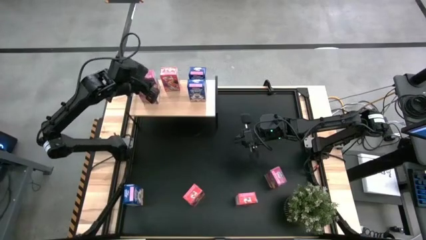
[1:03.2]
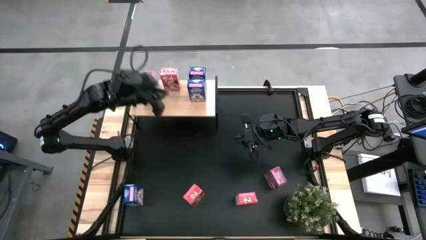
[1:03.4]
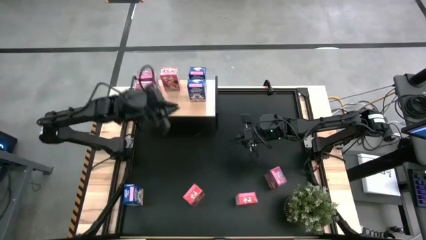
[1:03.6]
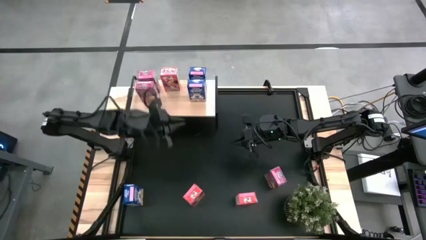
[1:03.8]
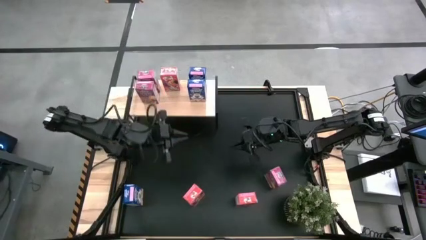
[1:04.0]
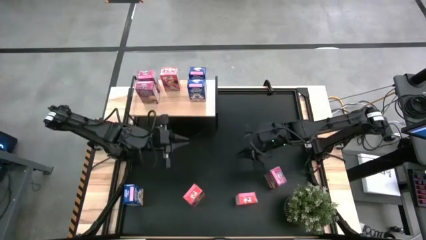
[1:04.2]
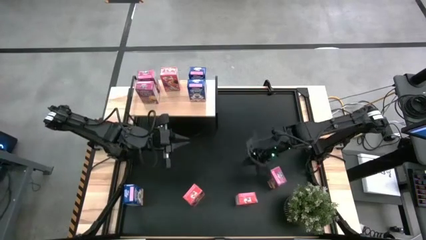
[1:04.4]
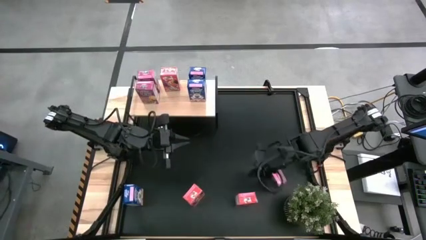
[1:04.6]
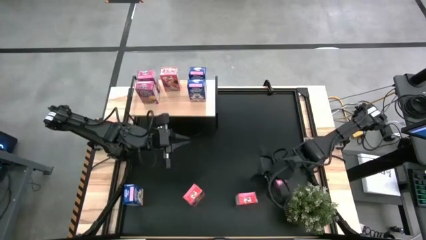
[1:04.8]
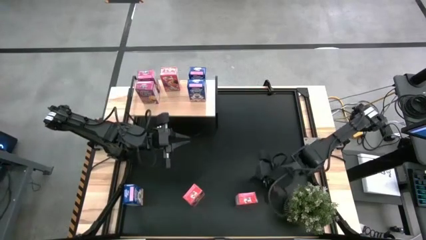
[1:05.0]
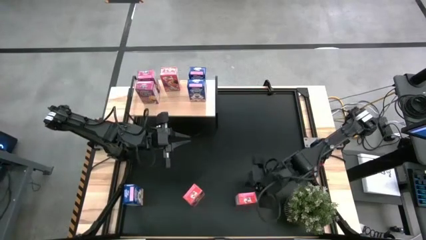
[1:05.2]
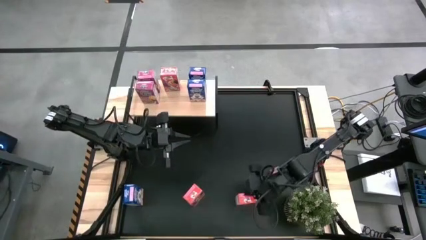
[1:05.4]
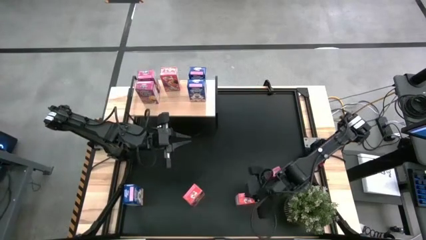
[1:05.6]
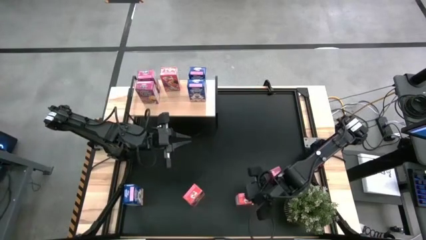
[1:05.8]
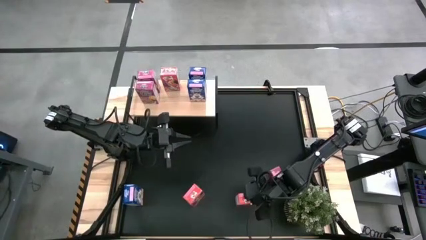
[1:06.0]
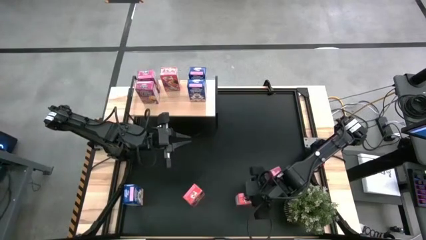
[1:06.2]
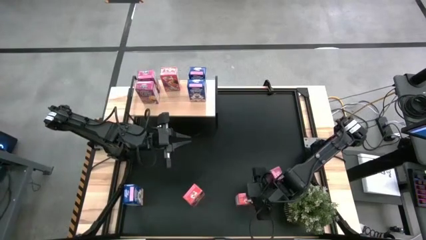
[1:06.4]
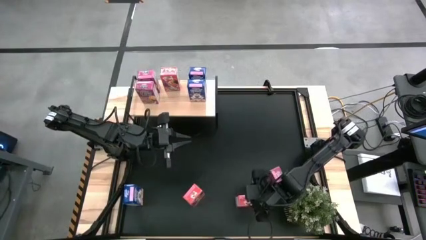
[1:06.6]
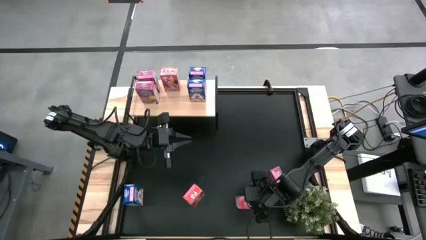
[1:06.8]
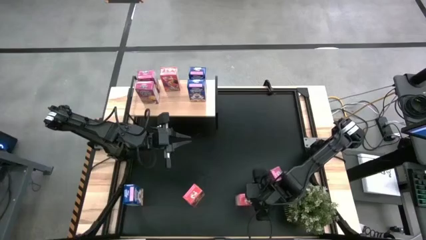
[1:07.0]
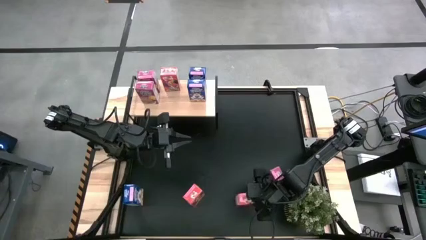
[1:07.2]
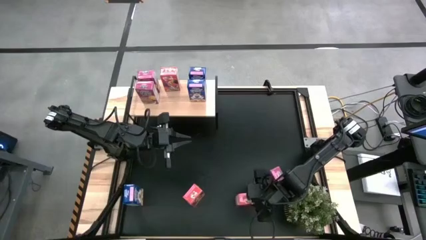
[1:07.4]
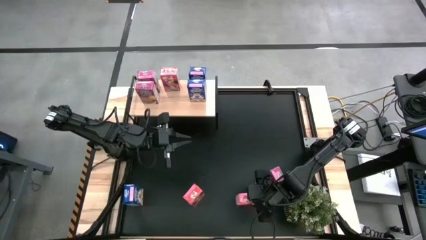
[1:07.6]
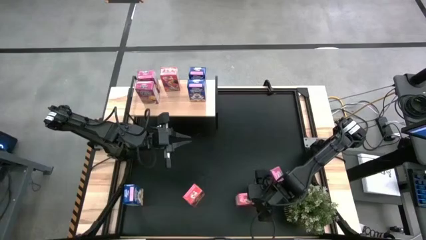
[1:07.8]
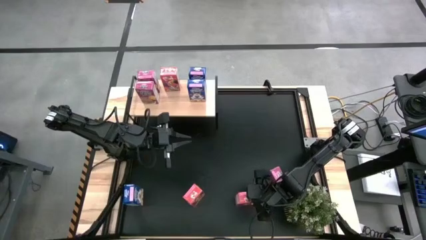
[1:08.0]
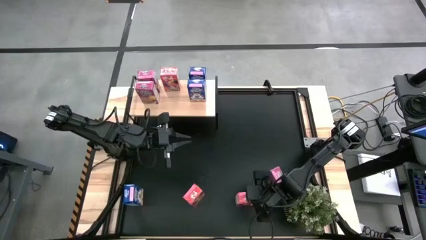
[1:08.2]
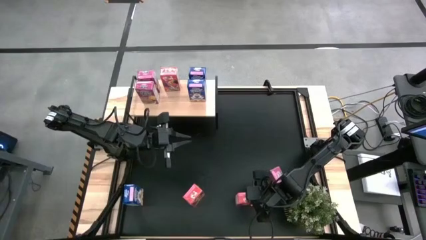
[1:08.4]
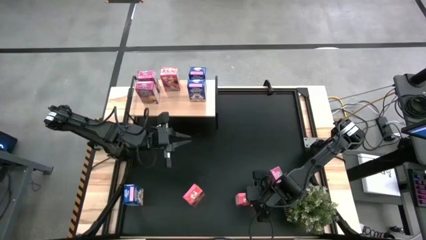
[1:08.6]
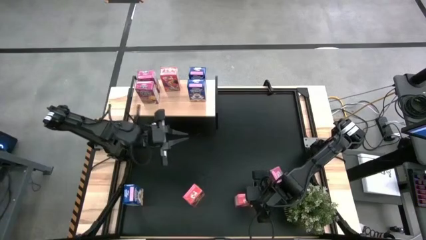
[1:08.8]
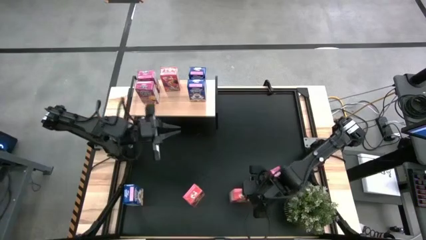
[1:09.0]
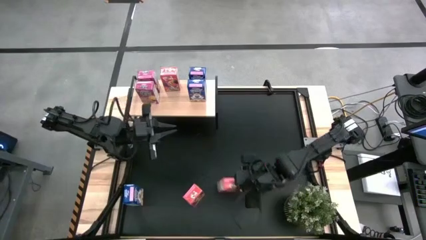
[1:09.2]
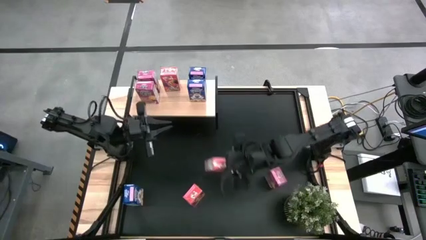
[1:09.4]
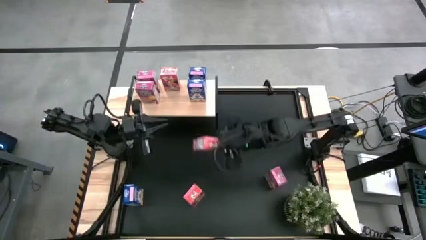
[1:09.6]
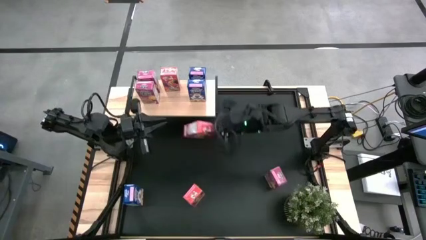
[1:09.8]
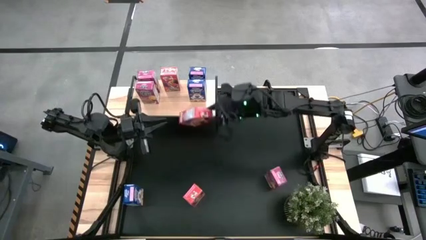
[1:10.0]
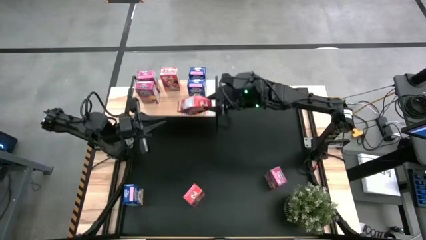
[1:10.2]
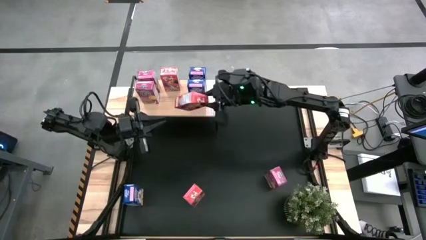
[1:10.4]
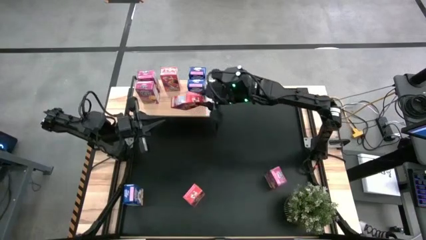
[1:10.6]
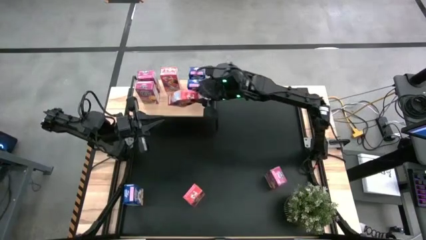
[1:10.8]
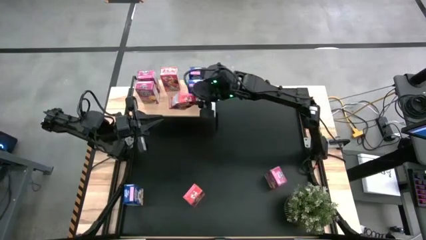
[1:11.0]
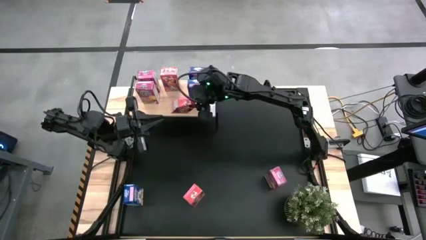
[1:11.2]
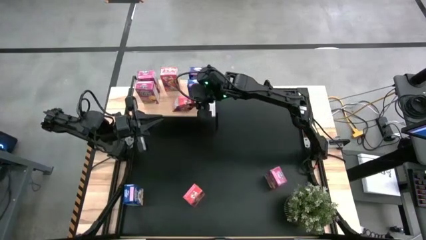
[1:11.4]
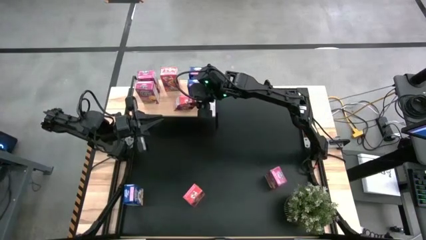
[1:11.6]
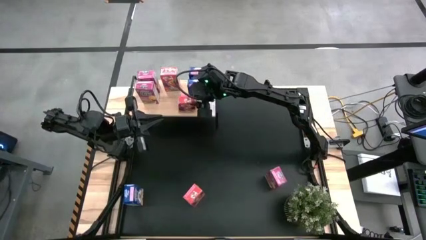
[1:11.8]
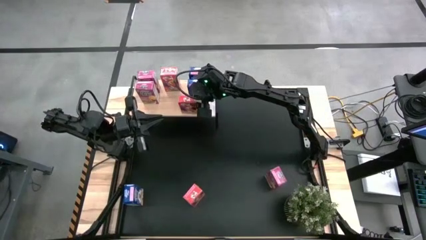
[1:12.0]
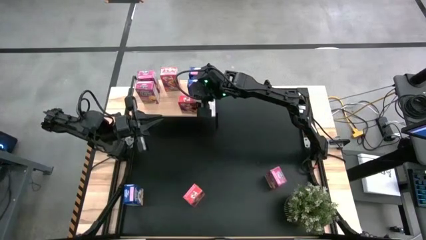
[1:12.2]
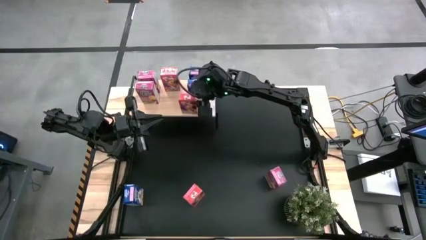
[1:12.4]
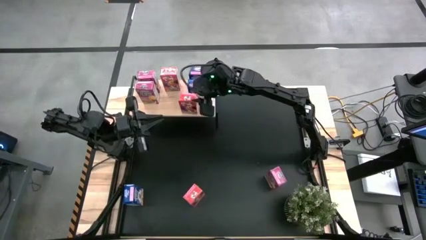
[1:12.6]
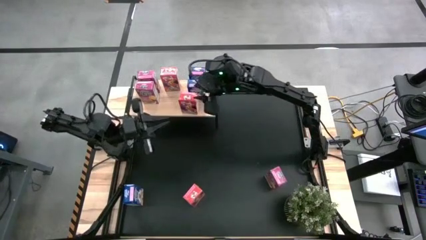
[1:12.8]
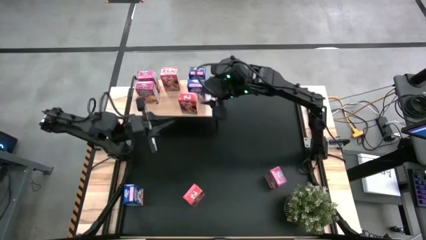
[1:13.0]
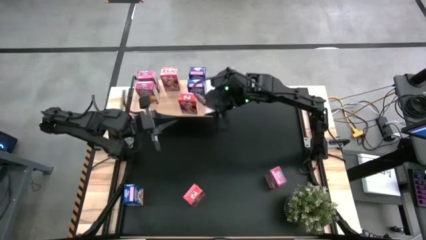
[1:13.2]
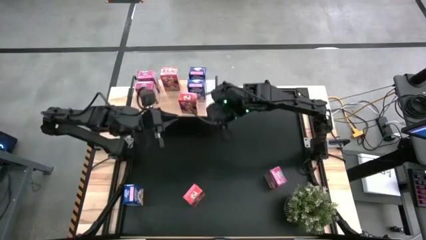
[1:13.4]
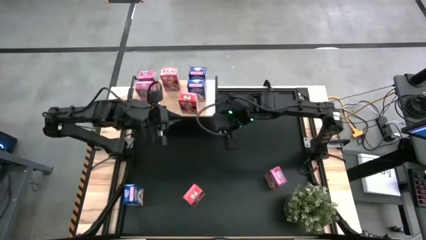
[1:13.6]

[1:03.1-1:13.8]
Task: Stack cereal on shelf
Align the right red cereal box with the other red cereal box on the shelf
